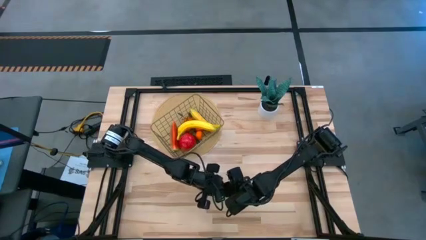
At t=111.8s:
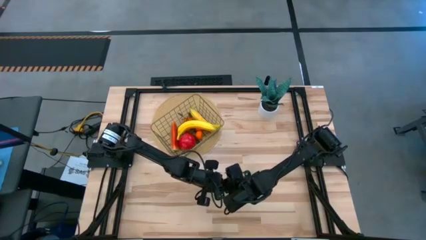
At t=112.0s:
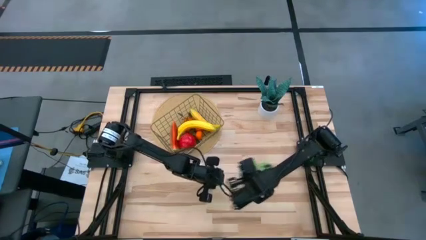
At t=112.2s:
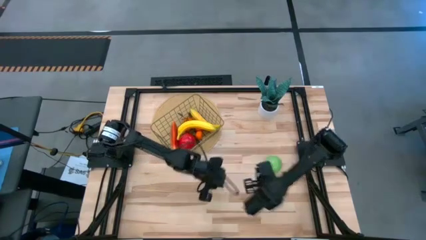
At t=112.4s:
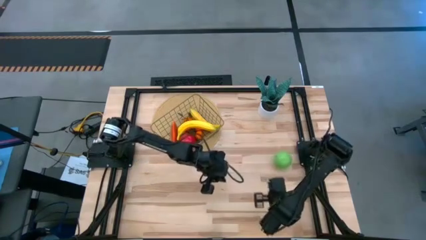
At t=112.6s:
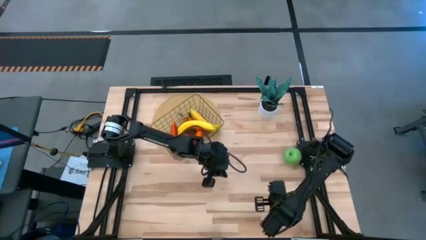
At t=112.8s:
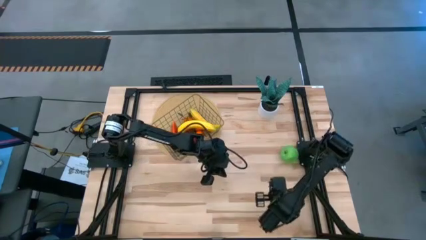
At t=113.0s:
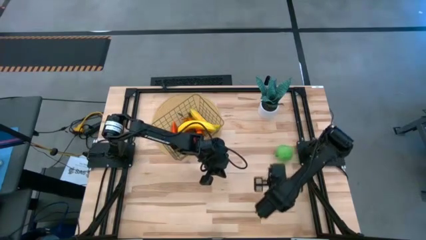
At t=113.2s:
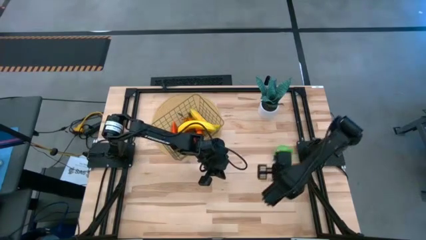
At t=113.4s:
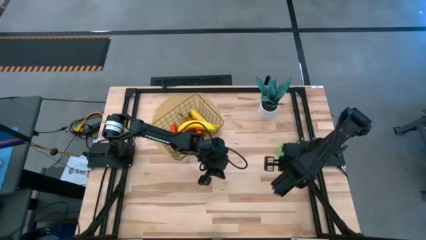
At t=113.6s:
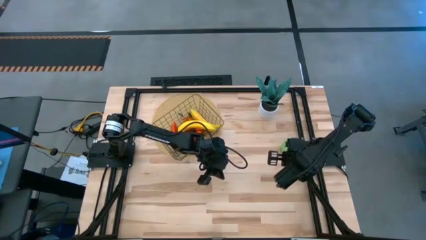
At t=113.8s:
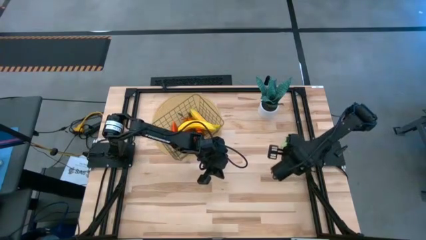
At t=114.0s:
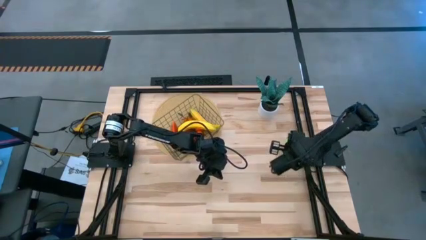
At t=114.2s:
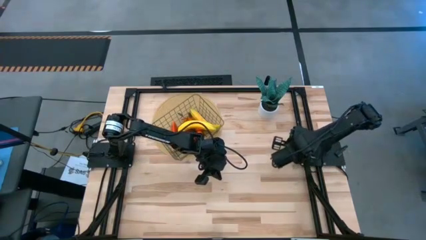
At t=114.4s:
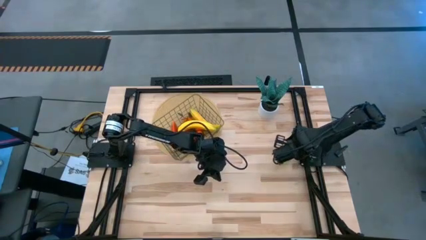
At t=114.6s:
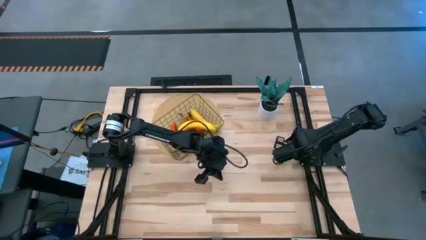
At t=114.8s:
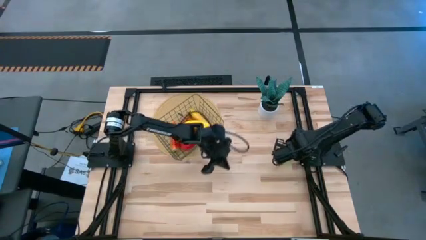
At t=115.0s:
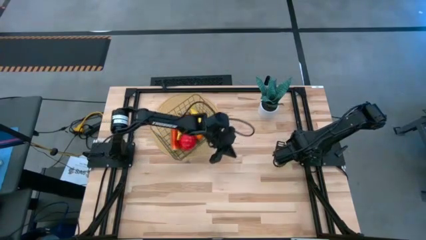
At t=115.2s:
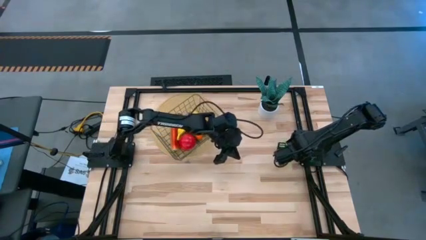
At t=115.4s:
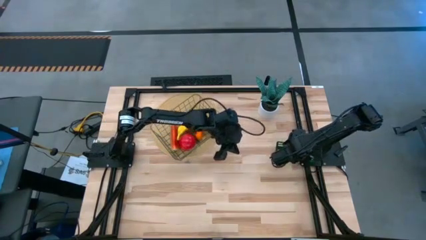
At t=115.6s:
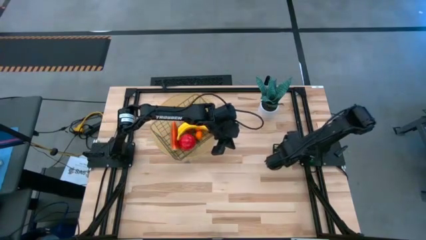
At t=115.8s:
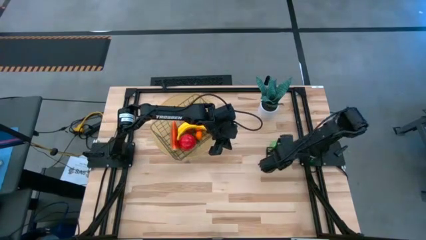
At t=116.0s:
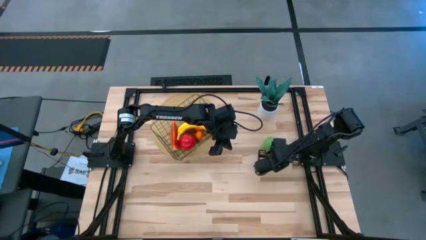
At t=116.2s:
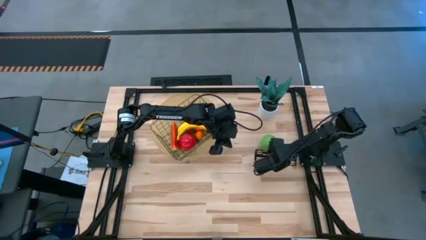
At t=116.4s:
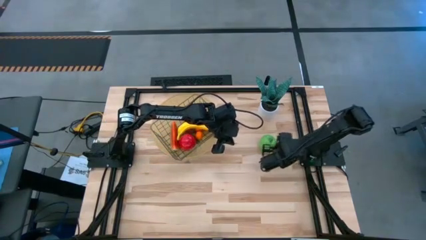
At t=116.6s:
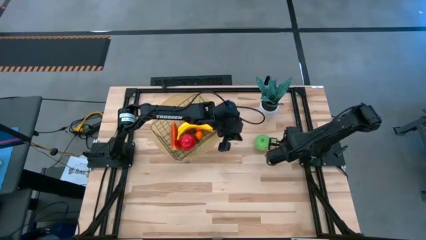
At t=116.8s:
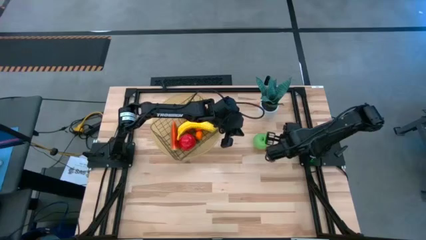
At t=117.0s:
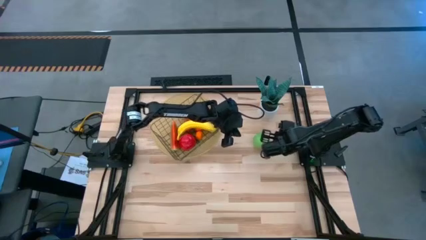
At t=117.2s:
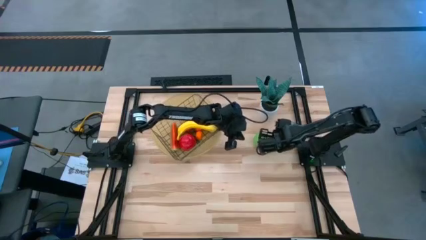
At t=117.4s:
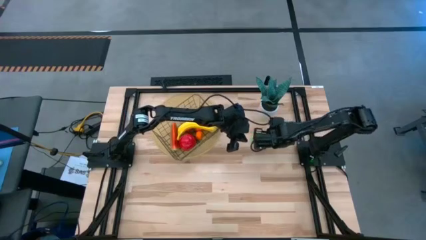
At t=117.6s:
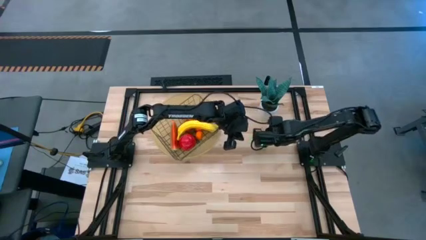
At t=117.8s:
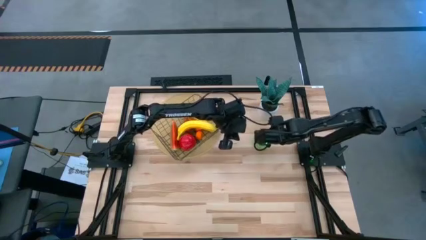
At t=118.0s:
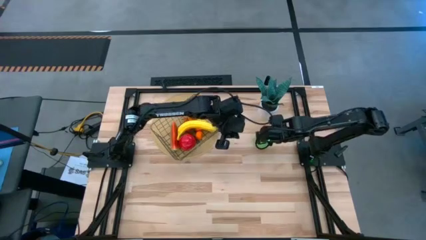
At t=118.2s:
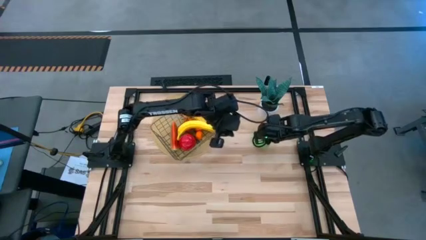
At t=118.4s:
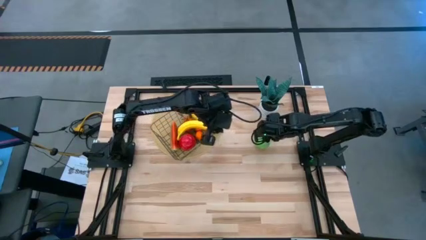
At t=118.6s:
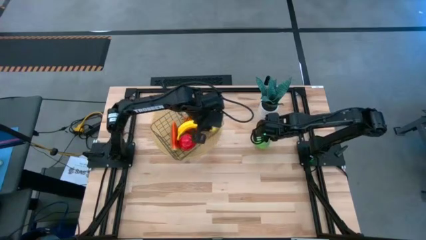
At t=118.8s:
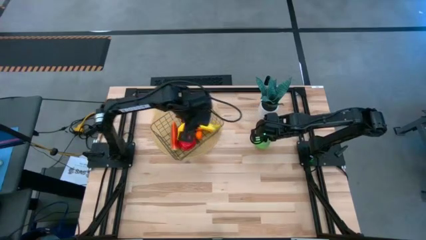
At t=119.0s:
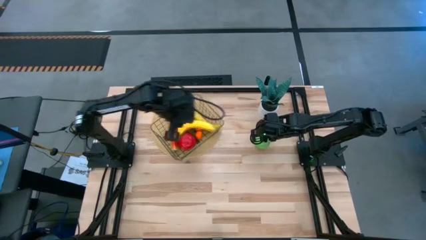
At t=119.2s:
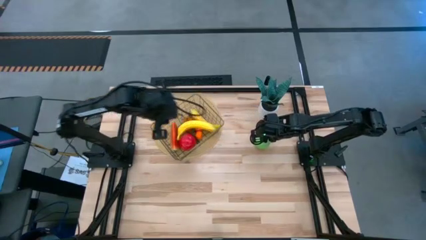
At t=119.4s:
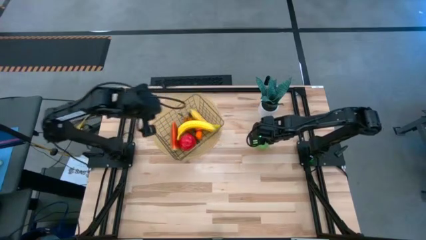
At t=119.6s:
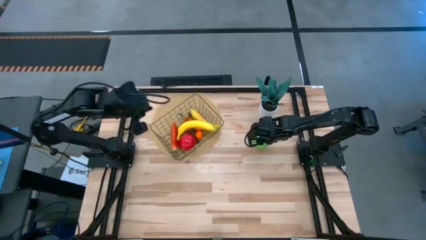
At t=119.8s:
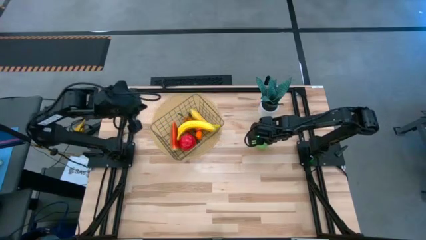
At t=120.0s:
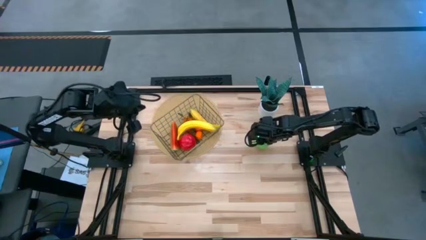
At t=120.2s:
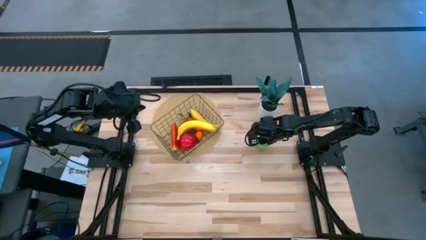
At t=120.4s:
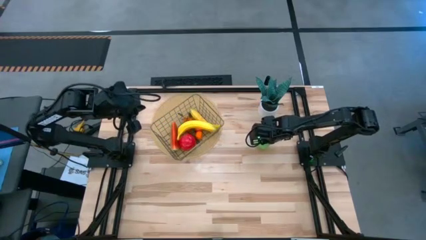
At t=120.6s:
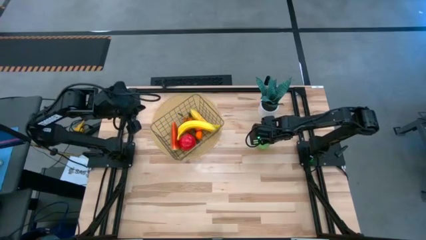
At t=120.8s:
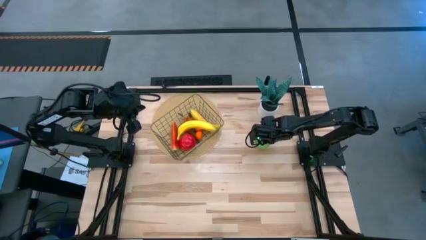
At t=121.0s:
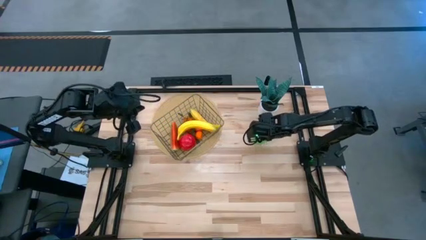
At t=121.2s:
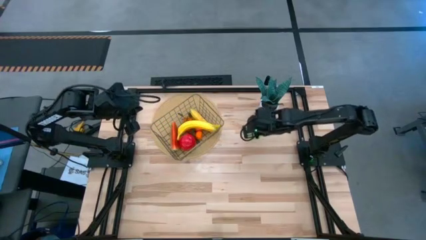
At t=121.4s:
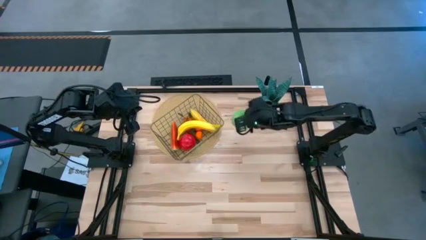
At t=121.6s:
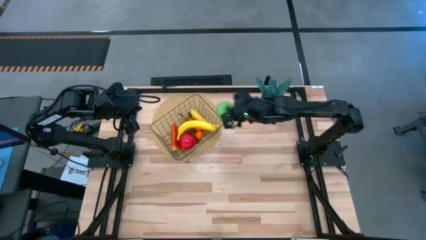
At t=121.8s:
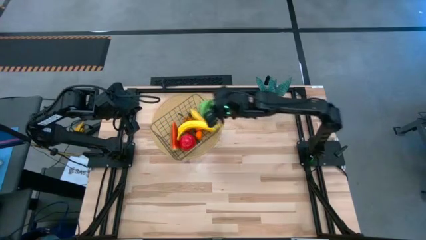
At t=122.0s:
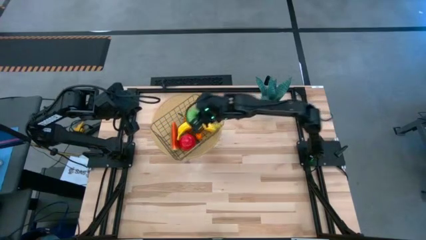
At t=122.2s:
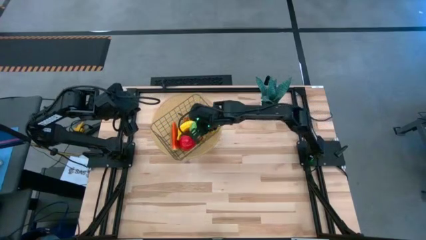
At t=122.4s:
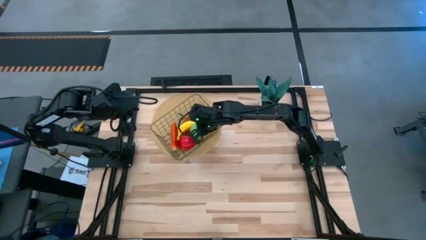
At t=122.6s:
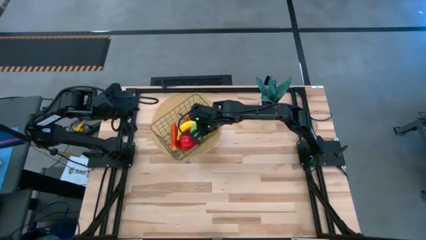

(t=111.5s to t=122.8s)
Task: Build produce basket
Put the green apple into the wire basket

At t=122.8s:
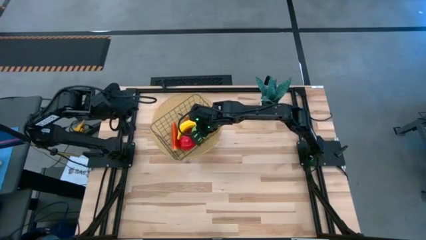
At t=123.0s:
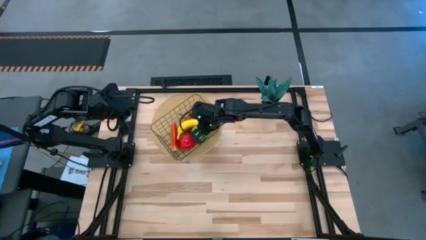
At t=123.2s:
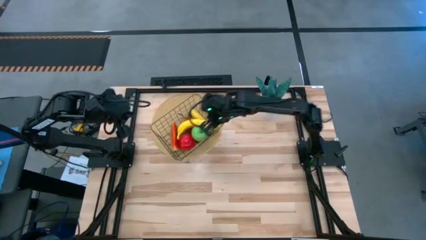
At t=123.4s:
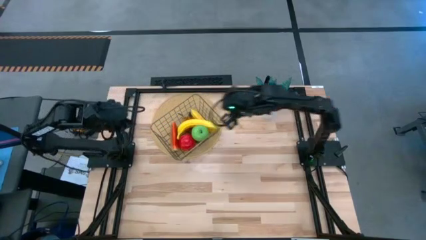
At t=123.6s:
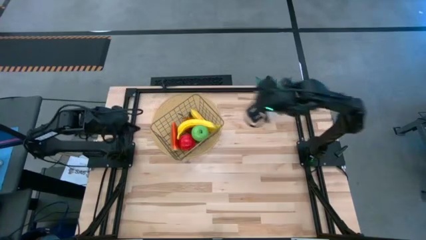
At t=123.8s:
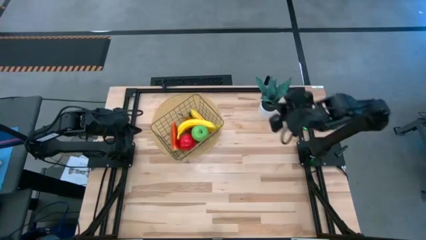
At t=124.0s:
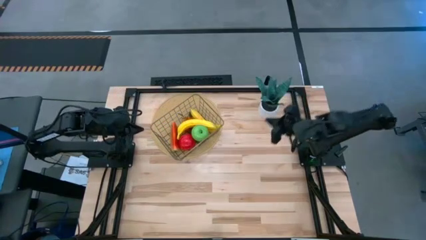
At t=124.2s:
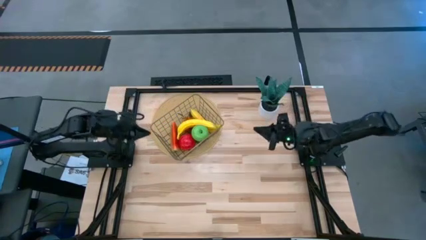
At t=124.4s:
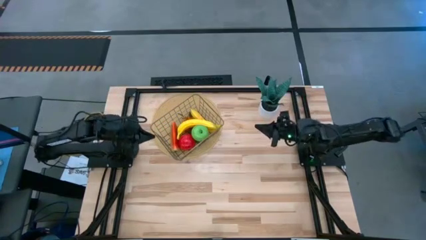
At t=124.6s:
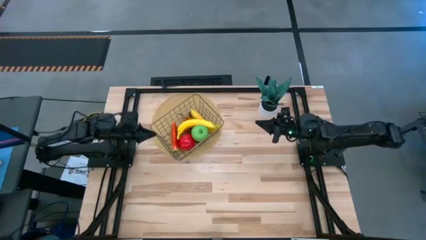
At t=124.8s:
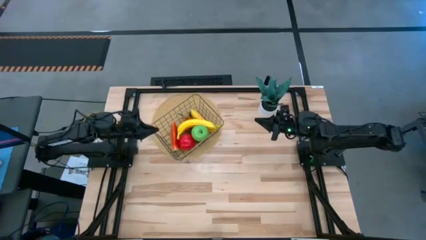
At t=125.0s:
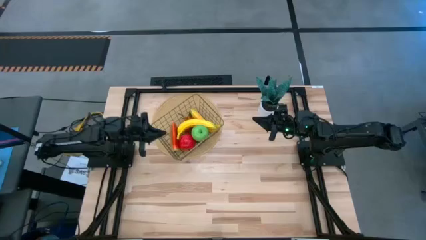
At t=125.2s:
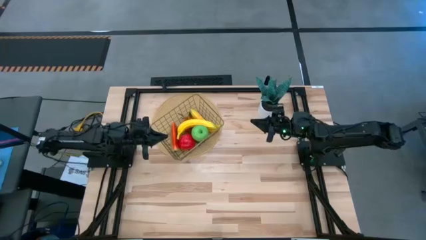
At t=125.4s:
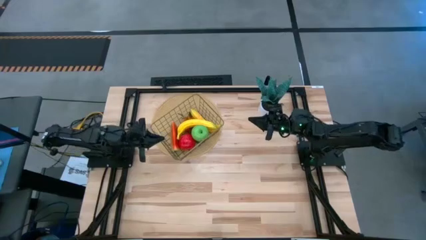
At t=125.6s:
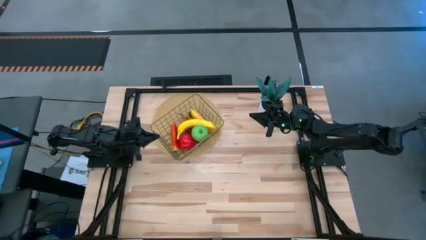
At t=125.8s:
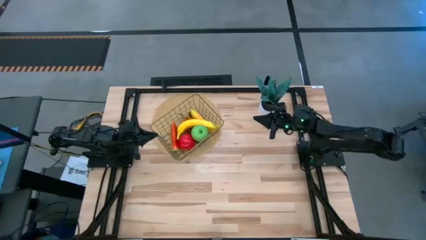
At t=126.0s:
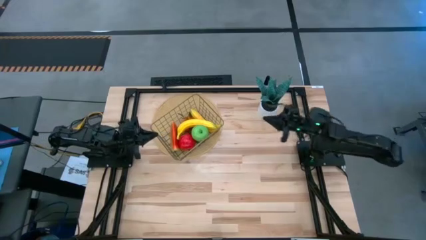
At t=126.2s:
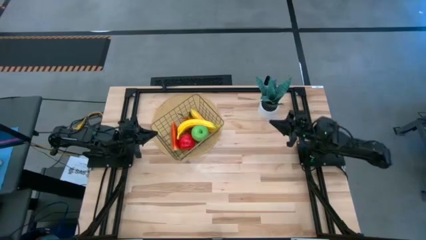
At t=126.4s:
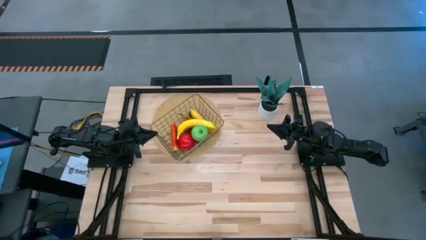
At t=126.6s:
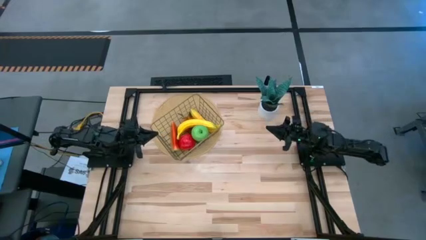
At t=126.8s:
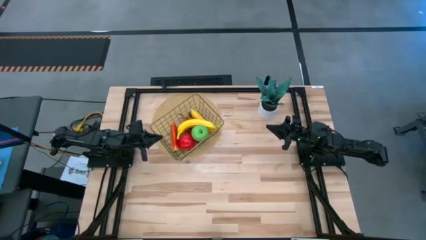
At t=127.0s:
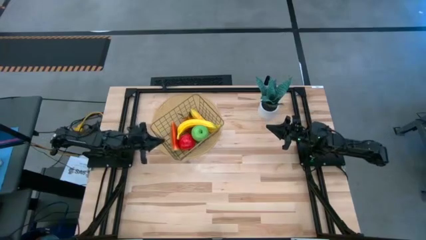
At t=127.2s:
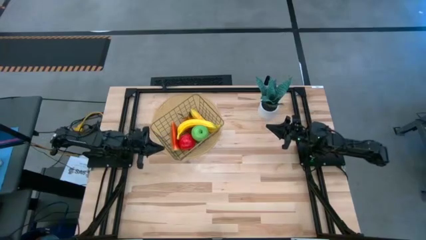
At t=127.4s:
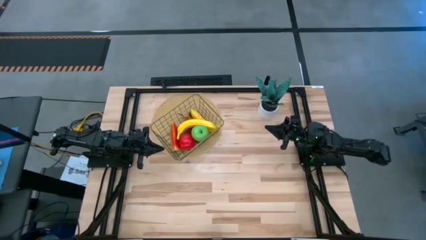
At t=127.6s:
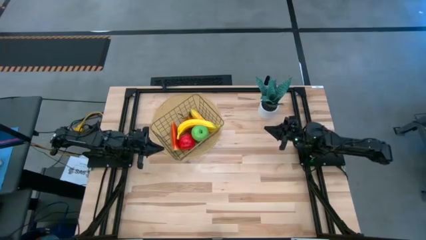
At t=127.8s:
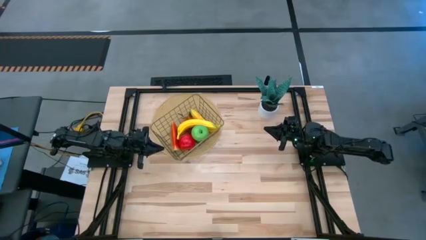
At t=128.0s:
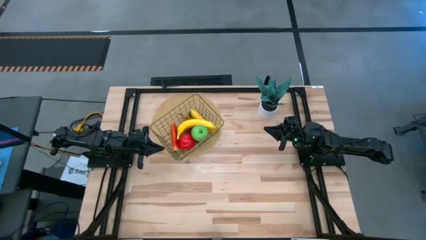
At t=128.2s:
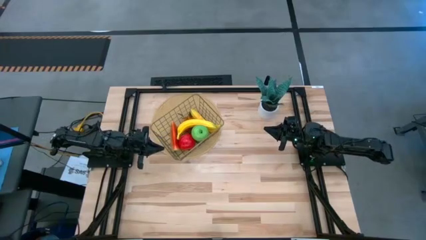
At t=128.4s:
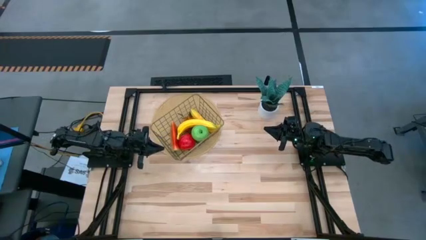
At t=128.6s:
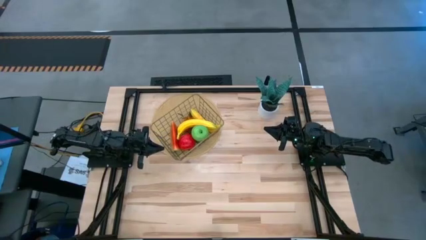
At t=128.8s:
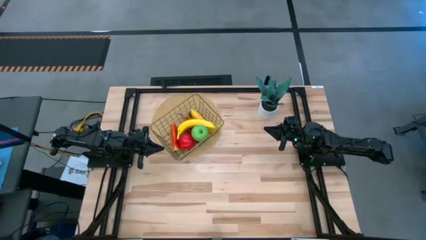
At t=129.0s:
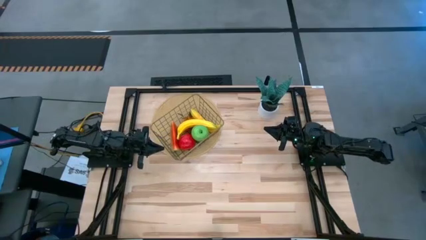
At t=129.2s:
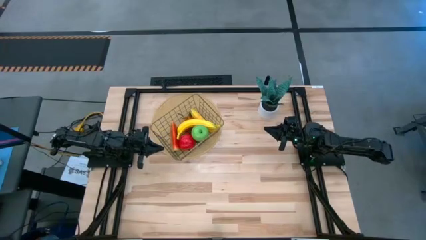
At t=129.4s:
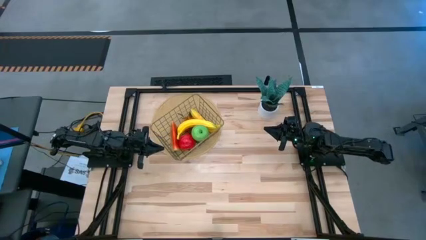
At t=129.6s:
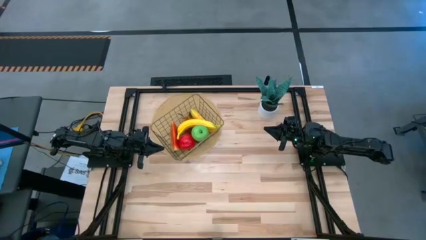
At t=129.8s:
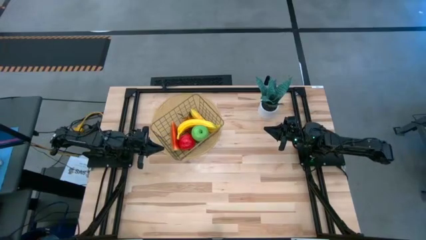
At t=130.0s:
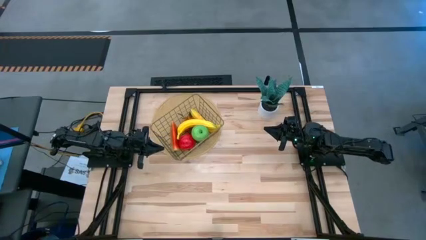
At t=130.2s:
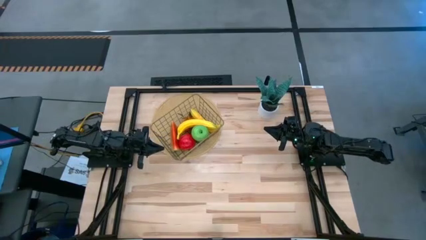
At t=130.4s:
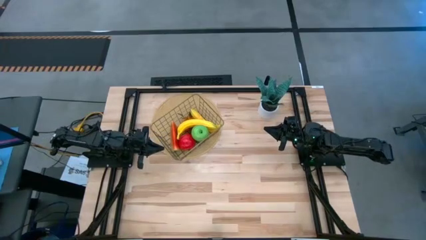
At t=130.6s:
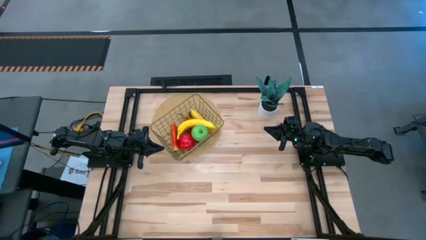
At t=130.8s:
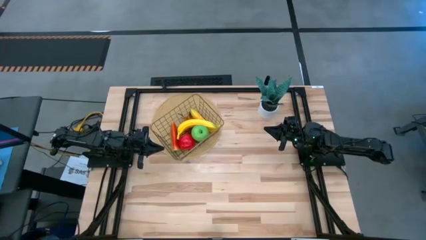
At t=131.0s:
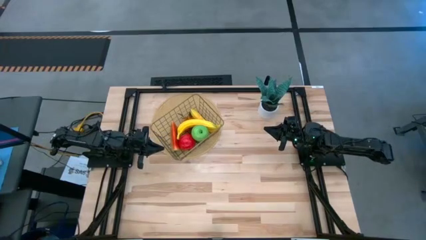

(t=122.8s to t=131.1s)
Return to Home Position
